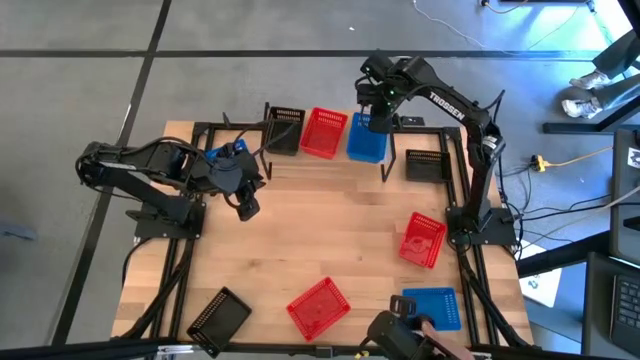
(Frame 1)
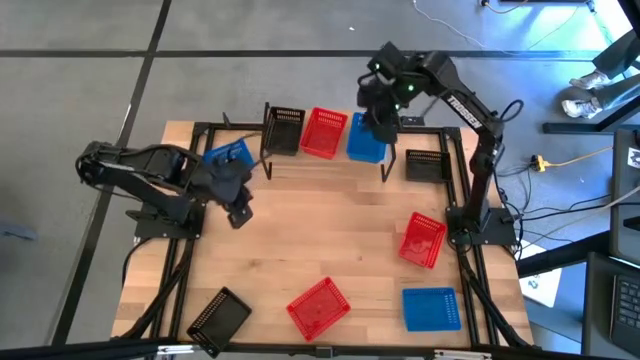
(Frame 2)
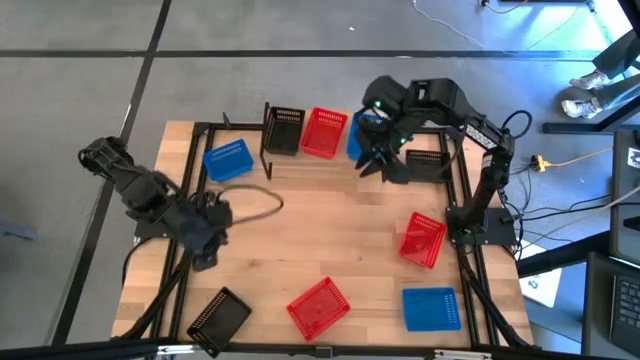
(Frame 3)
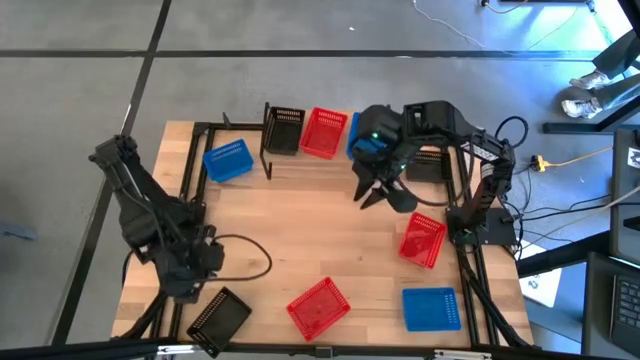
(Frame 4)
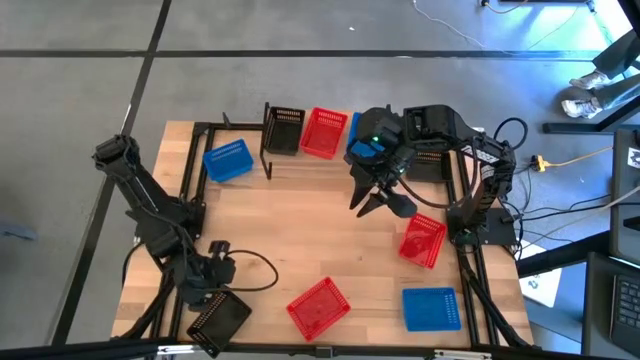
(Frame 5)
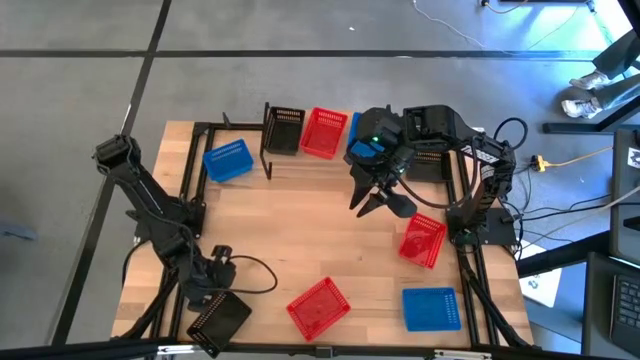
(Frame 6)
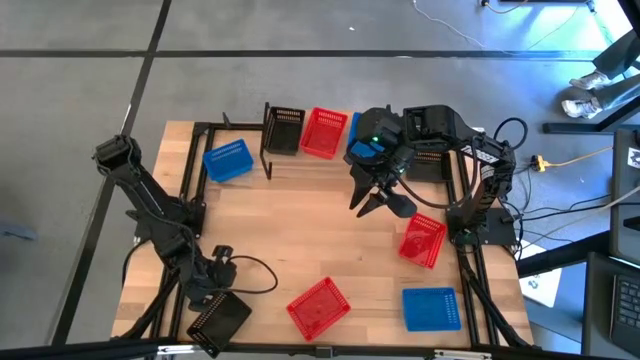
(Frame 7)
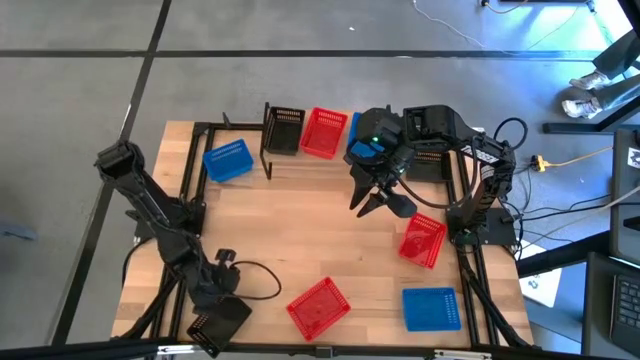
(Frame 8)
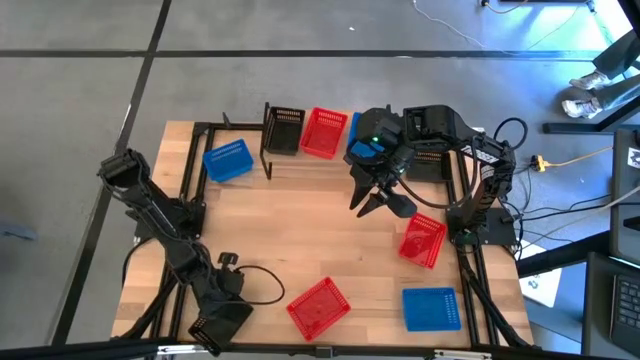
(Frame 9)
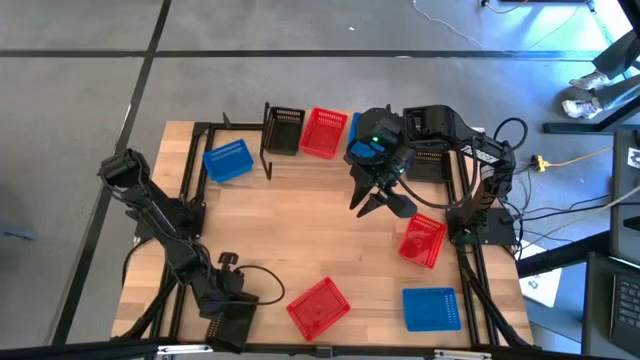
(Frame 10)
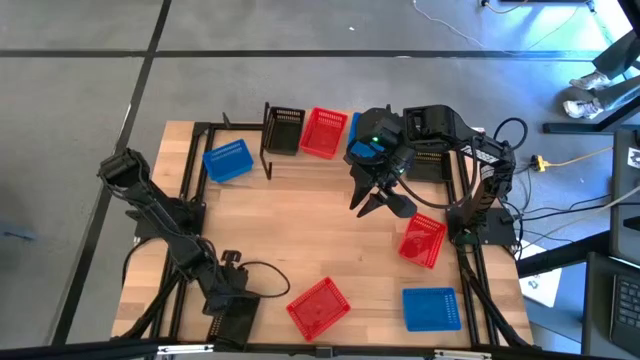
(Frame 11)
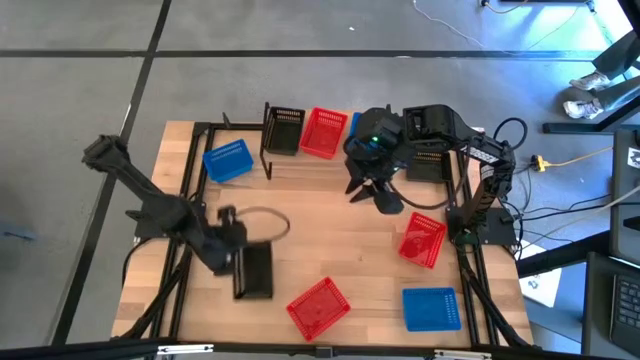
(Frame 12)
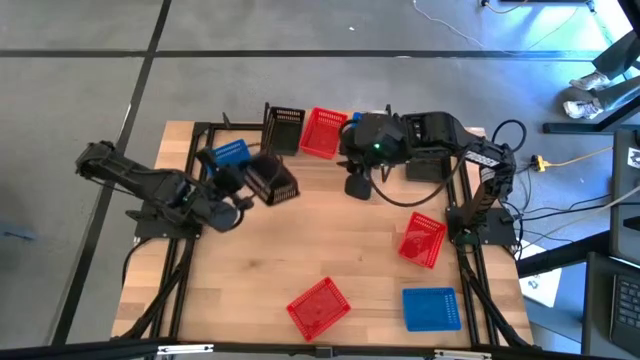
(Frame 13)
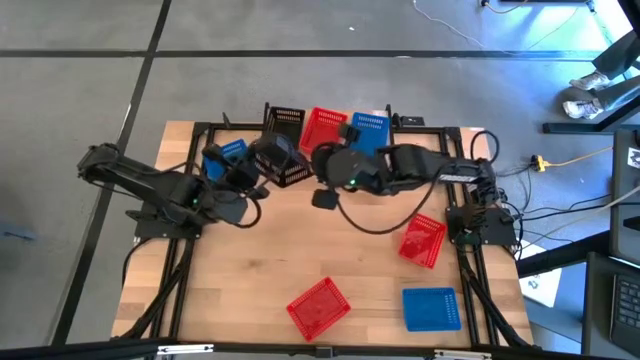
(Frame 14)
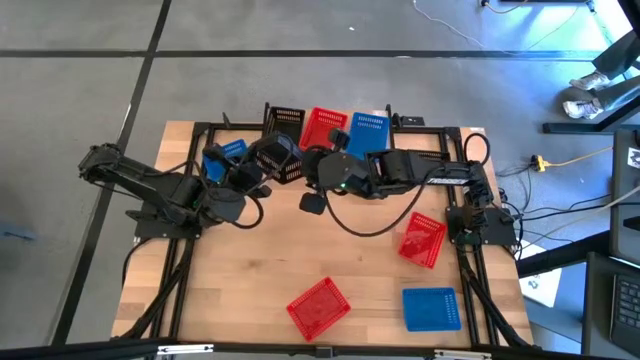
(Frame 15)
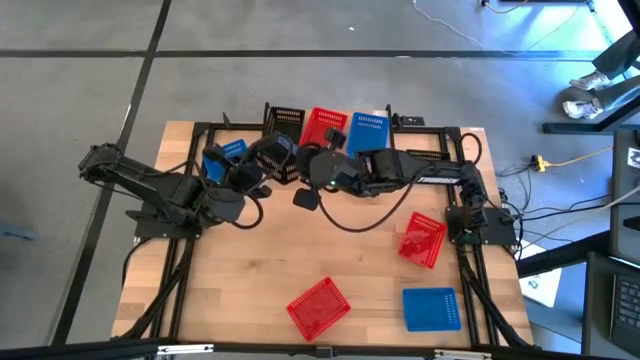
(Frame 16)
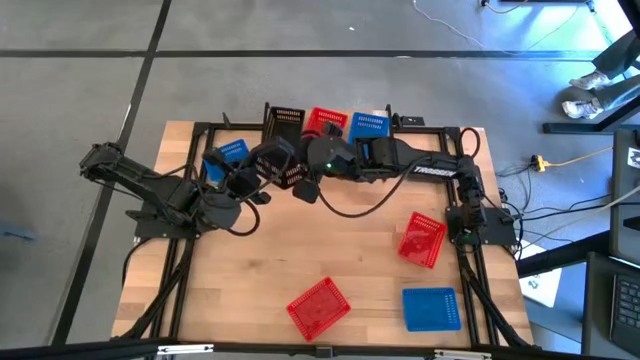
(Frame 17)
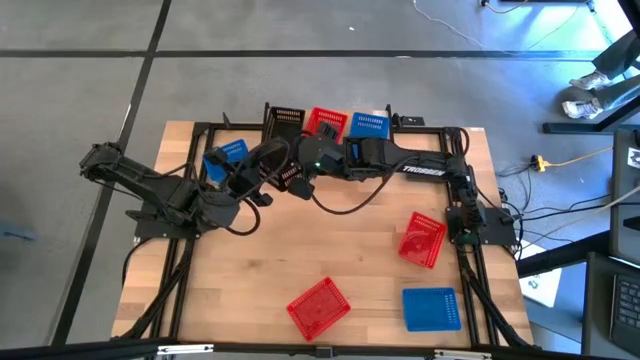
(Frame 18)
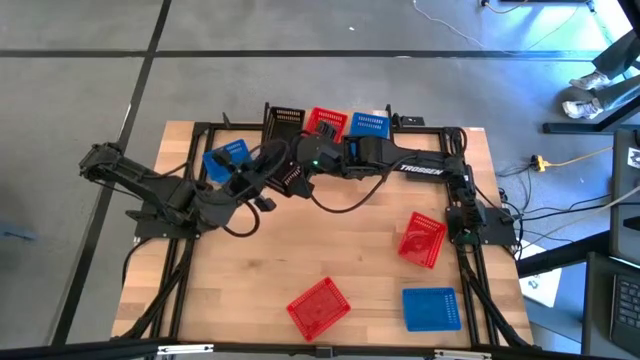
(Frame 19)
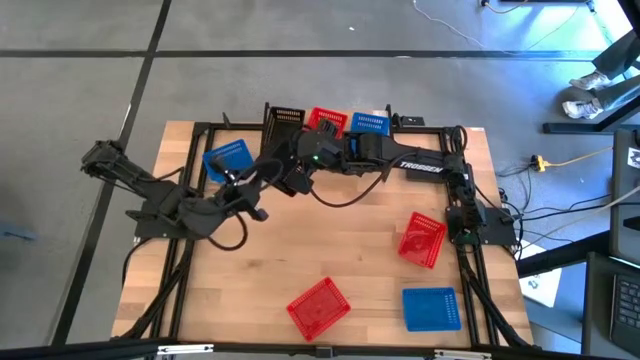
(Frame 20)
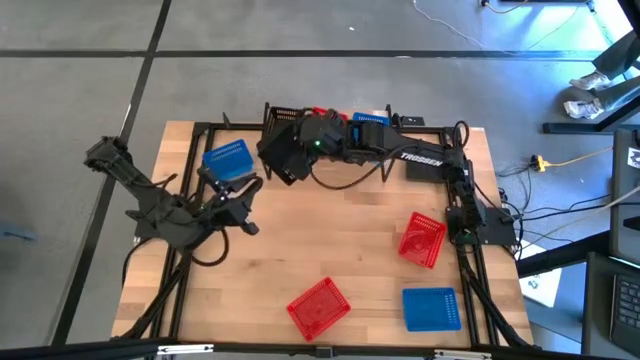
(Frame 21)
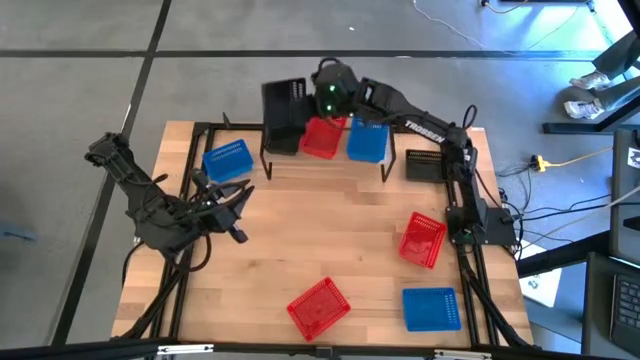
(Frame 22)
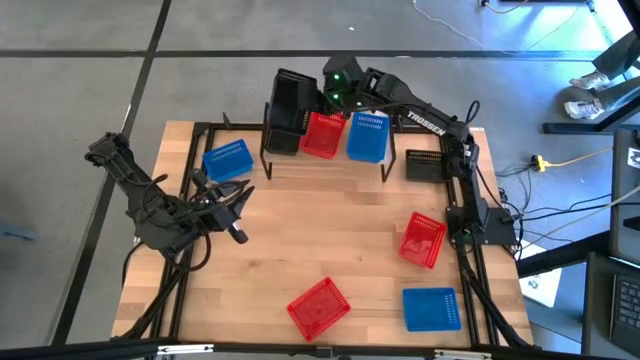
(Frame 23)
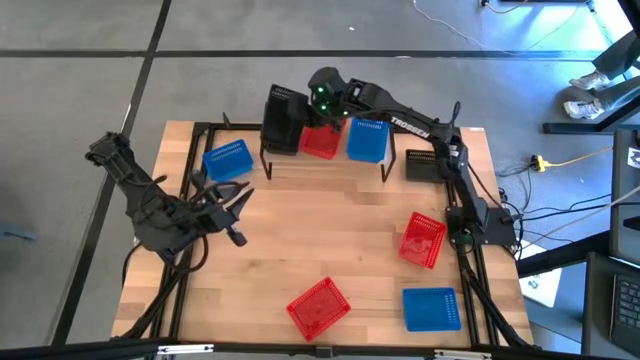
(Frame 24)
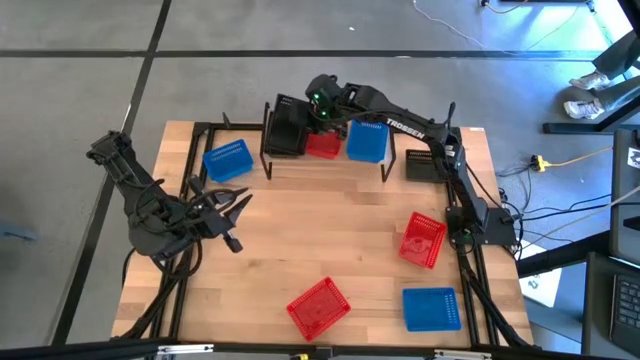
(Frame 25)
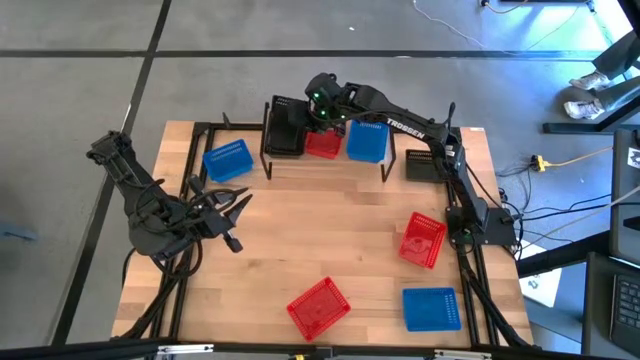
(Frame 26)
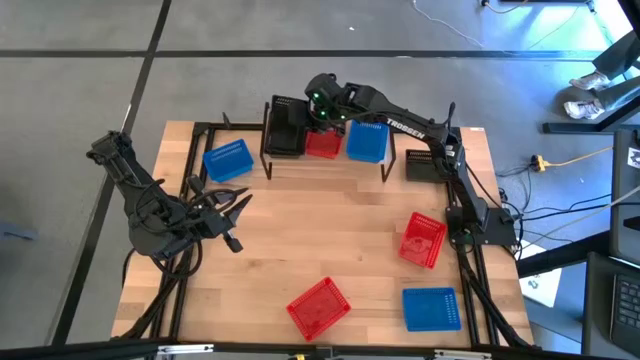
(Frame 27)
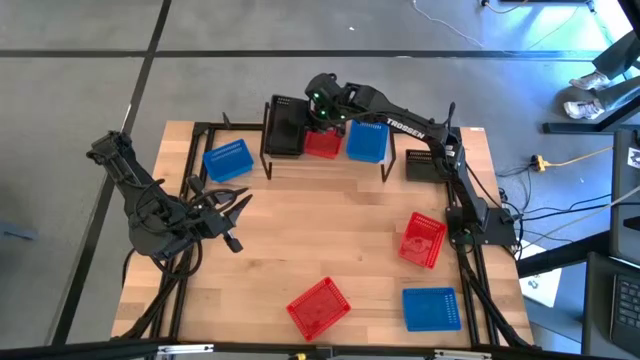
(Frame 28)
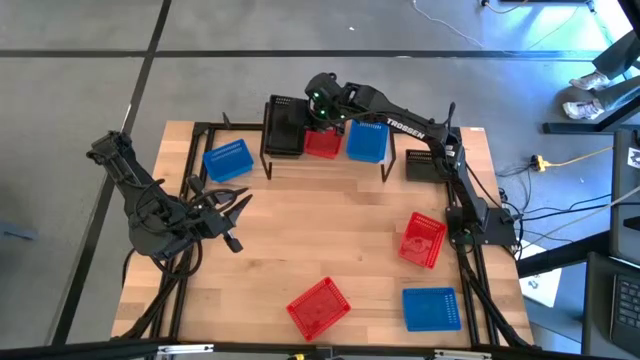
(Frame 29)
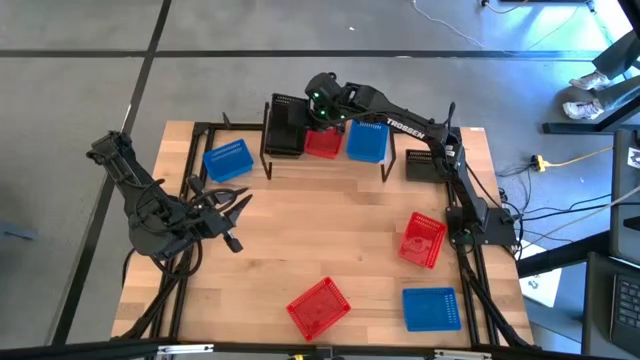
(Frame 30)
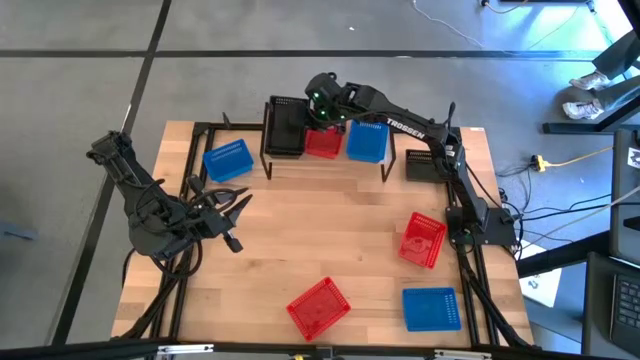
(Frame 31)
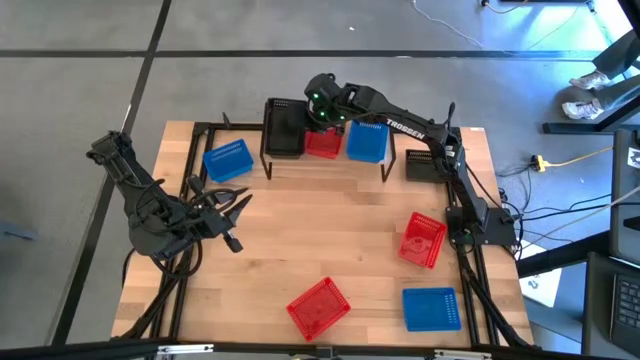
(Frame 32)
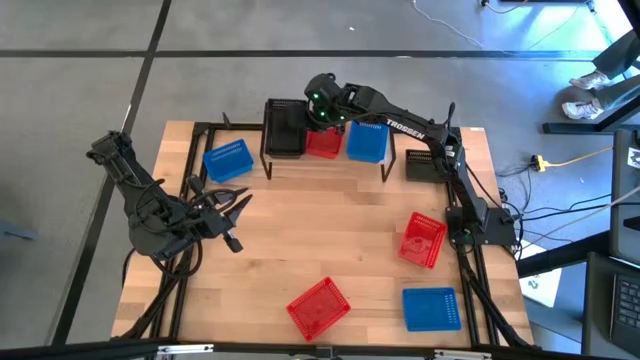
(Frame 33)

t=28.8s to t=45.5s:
Task: Stack baskets on shelf by color
Stack the bottom black bin on the black bin on the shelf

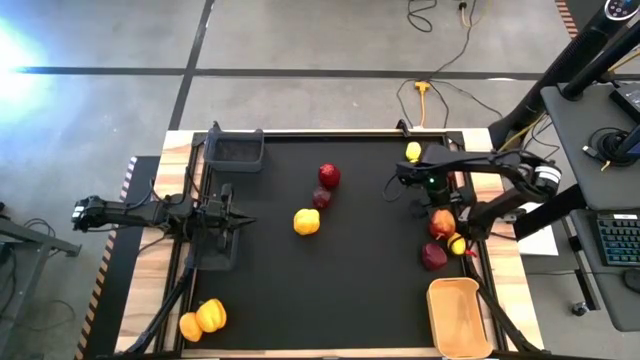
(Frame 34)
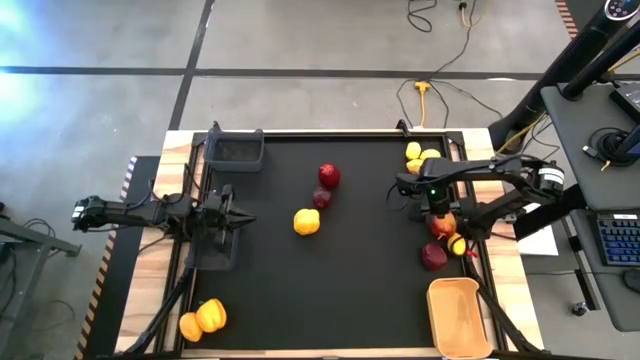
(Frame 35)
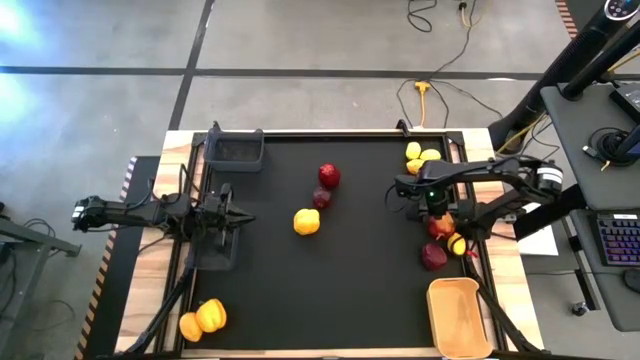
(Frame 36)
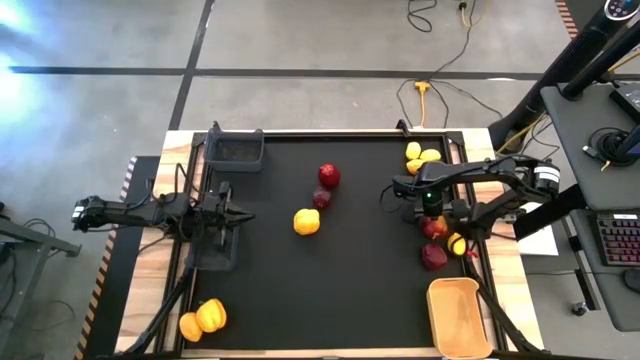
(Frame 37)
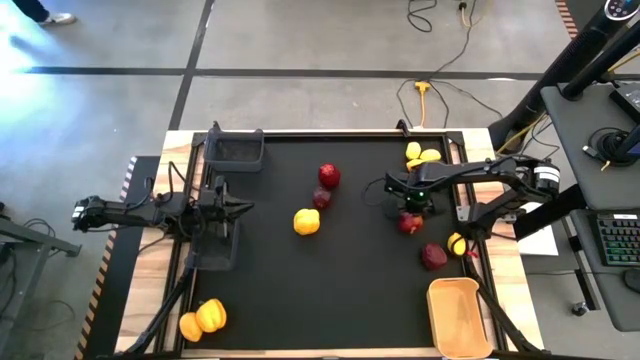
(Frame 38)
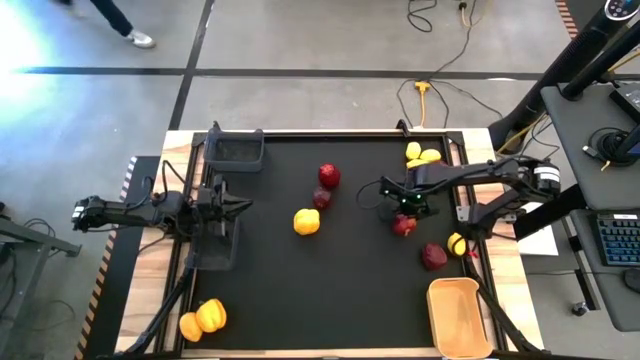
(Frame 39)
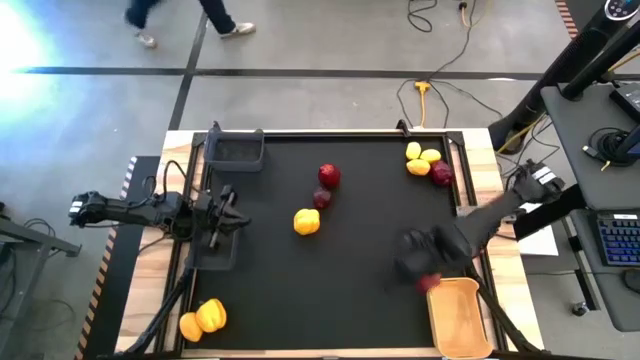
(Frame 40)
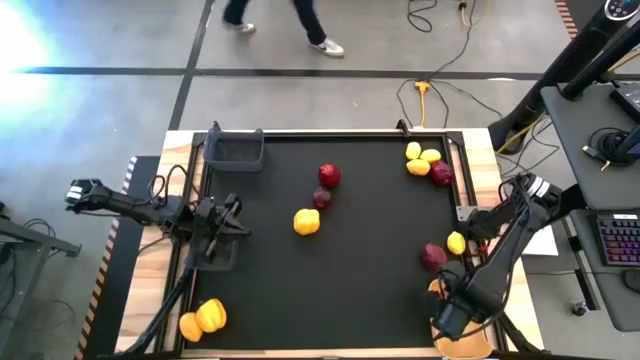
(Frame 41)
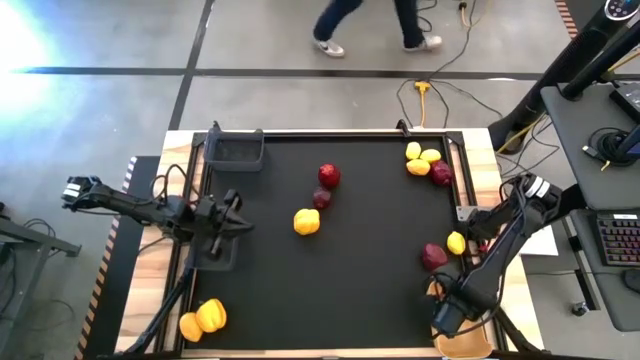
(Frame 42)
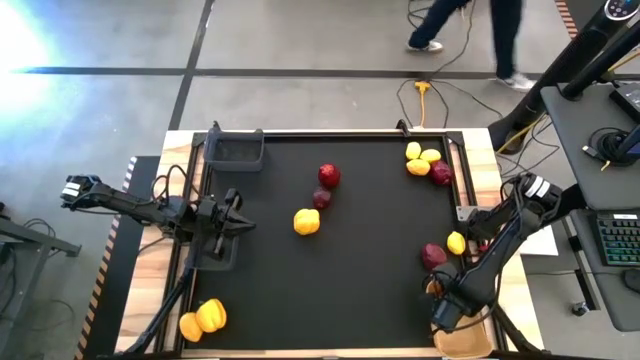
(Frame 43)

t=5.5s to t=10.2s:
Task: Sort produce into baskets
Put the apple into the yellow bin
